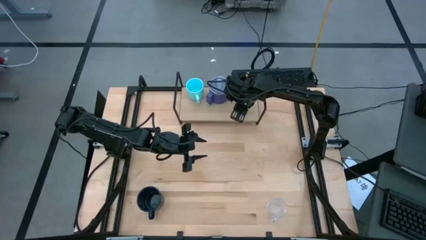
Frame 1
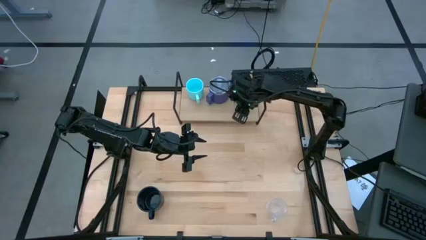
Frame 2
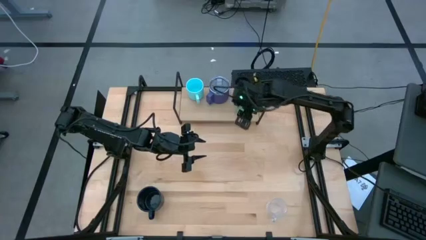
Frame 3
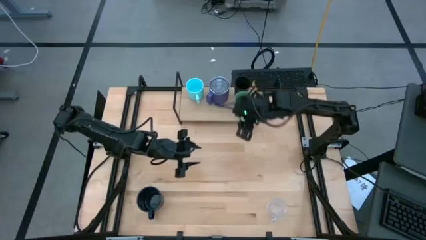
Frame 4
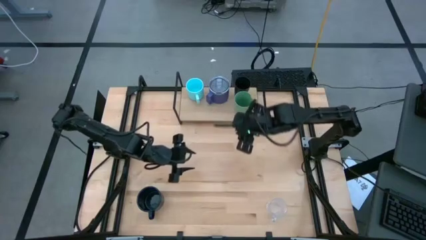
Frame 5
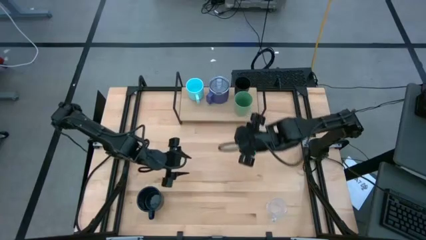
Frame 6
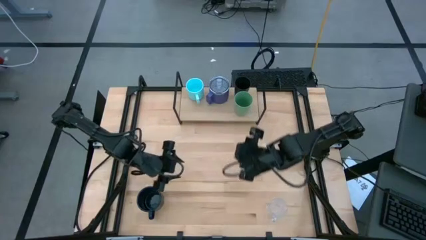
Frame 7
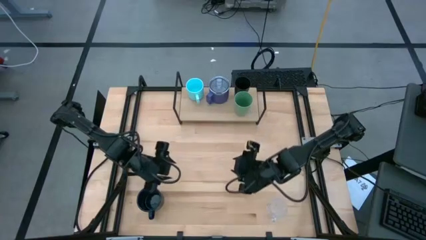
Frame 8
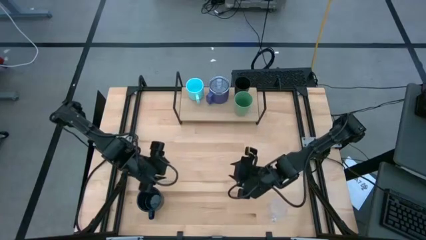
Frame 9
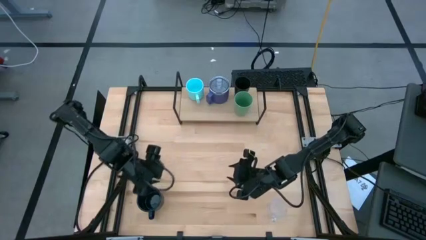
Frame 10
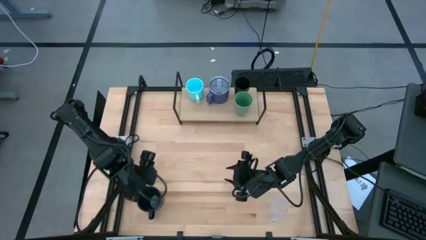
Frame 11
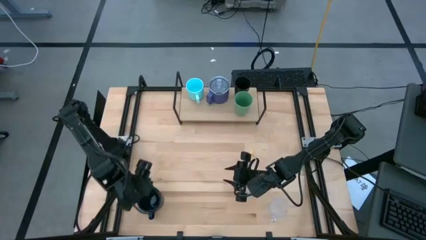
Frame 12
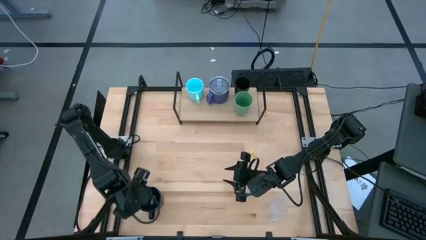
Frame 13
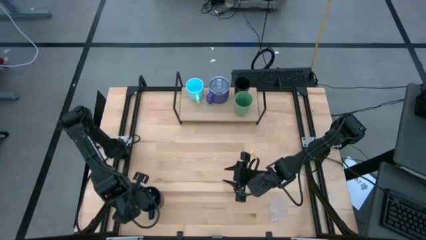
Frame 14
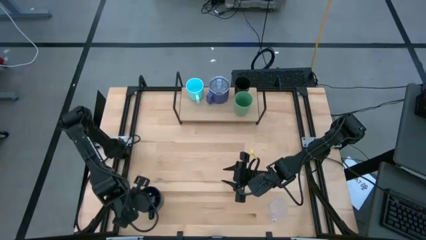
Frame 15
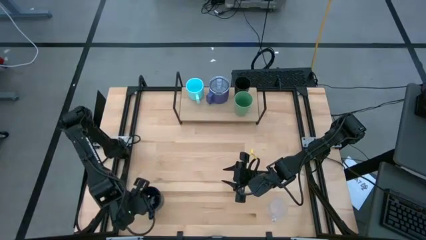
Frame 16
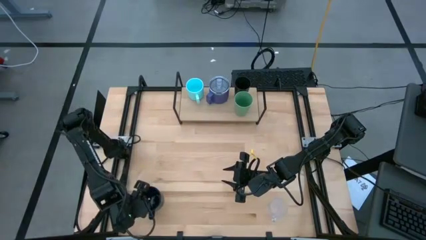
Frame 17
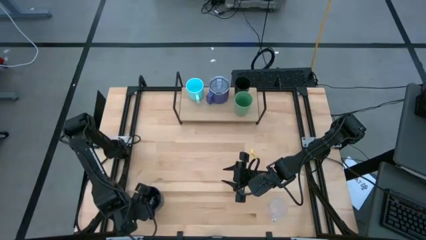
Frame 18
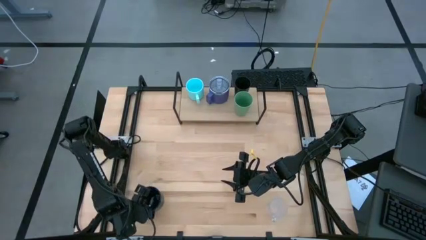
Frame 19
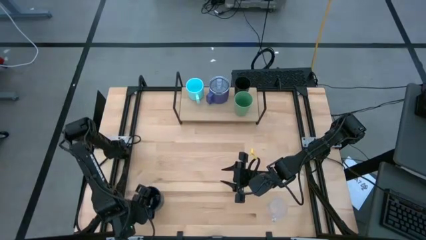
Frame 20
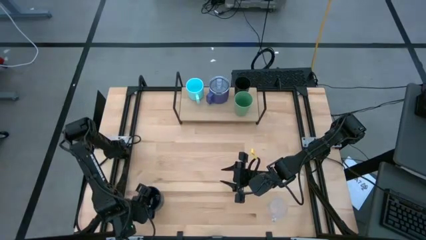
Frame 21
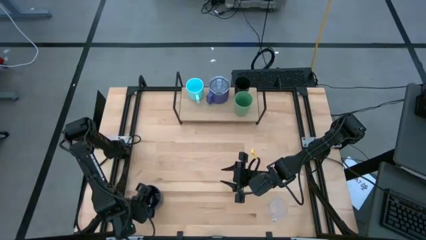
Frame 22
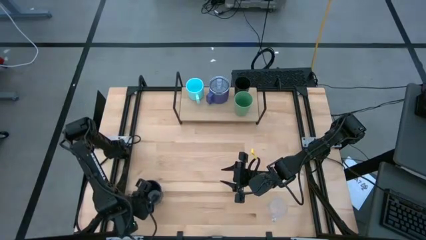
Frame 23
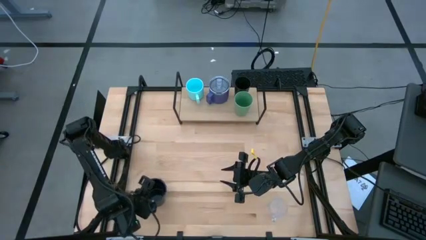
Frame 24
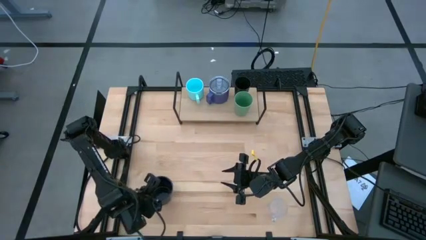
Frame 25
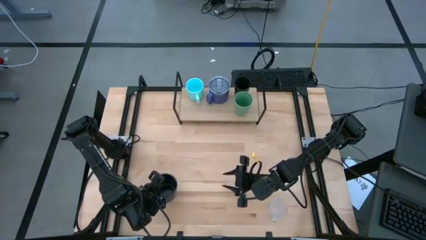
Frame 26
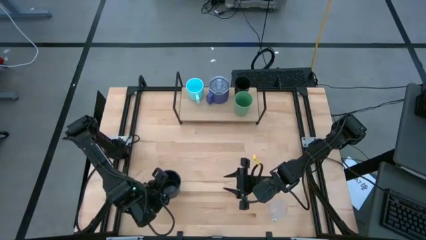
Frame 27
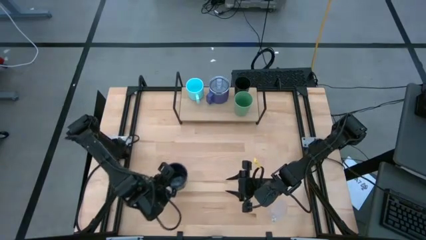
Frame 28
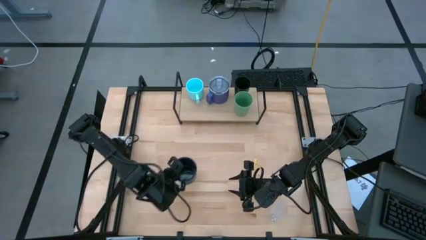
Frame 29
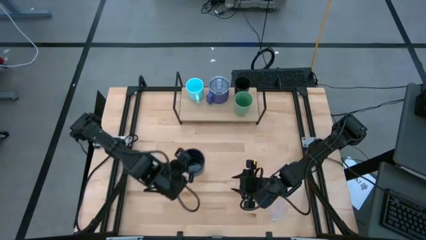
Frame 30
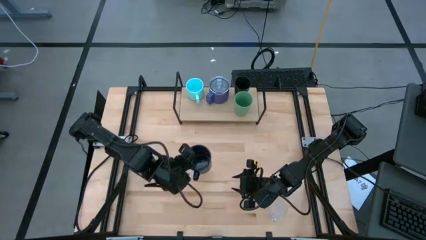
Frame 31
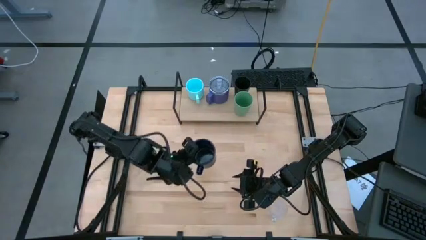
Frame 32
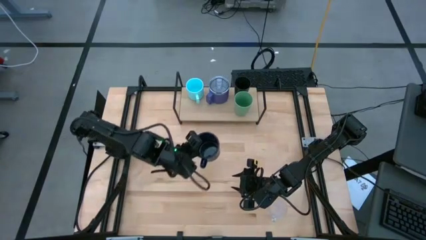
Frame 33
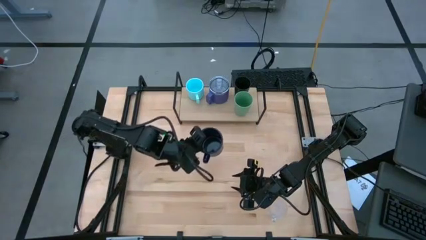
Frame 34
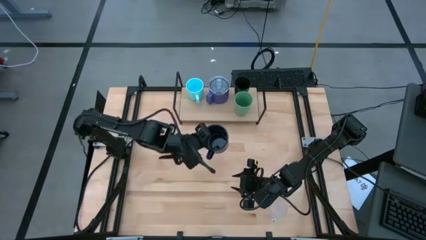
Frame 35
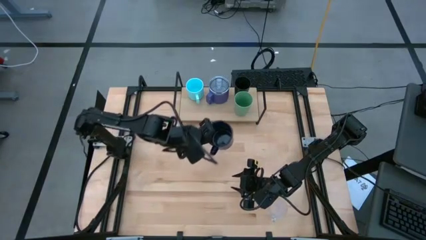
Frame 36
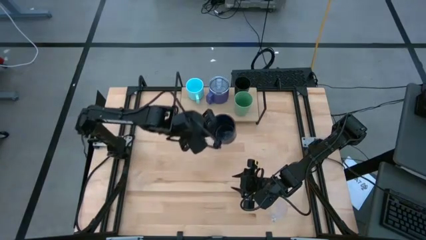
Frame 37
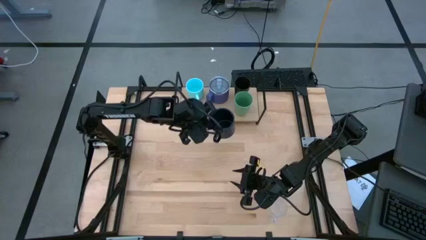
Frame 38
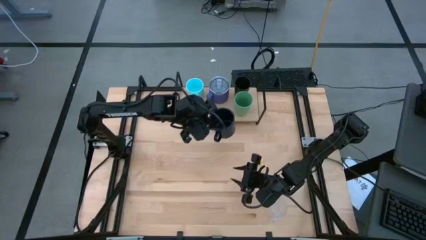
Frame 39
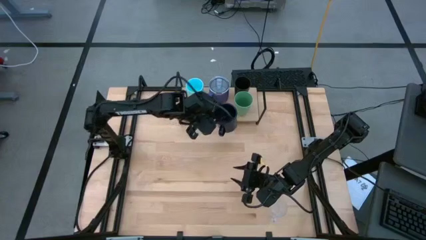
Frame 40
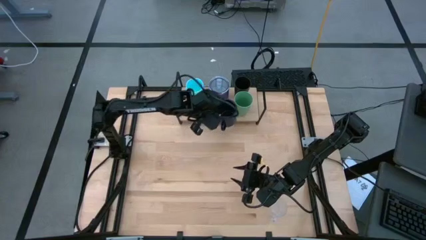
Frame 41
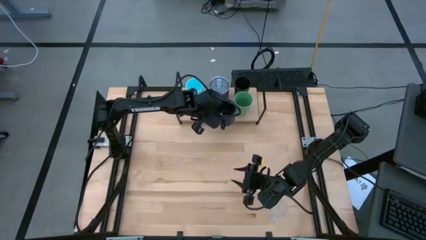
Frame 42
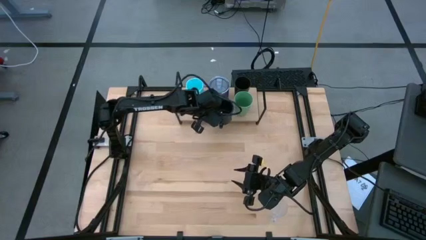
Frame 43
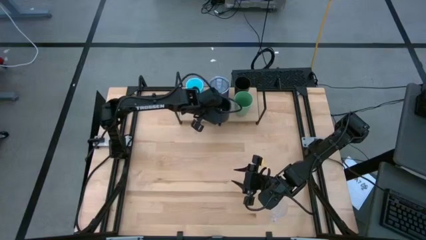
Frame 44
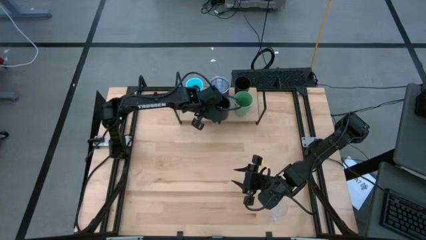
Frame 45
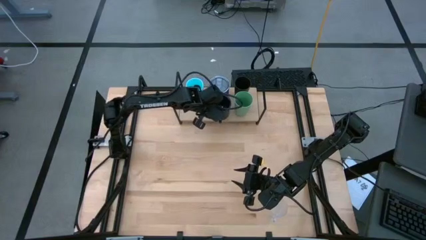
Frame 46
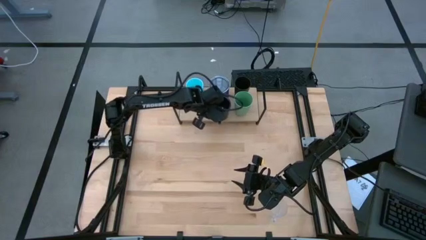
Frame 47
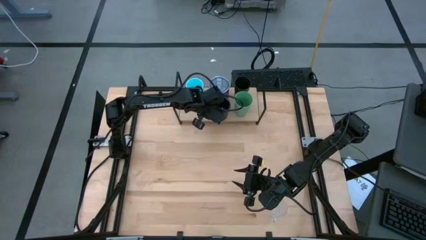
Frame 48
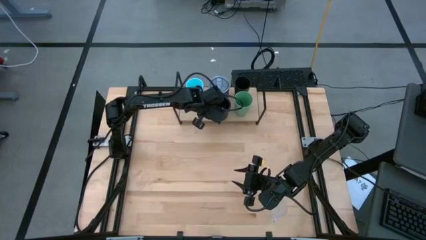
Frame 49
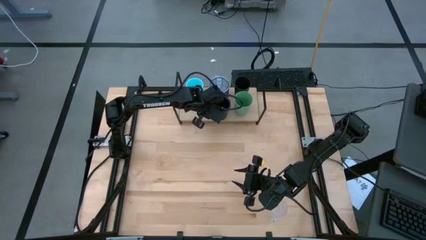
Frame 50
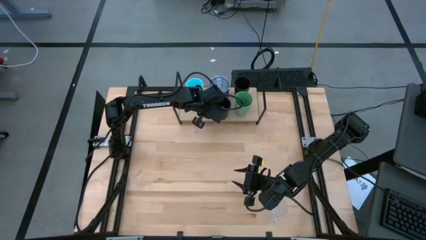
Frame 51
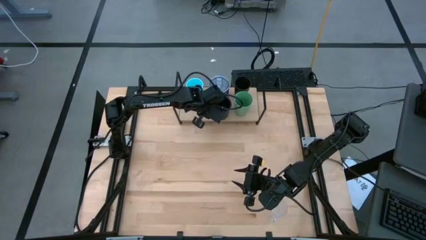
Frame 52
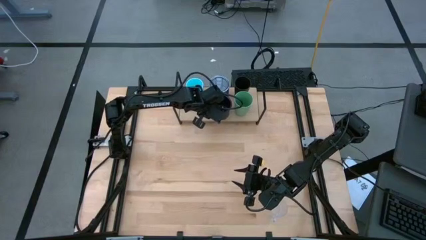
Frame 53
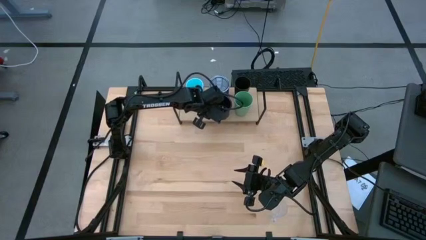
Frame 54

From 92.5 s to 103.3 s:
Task: Stack small to large cups/mugs on shelf
Put the dark blue mug on the shelf

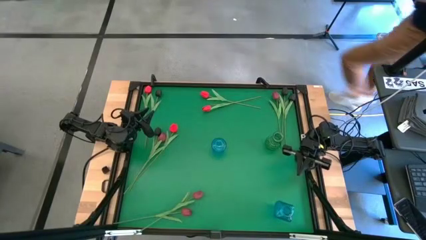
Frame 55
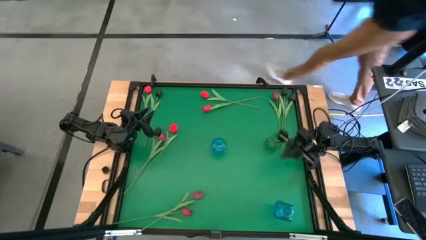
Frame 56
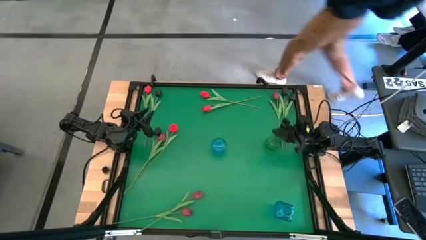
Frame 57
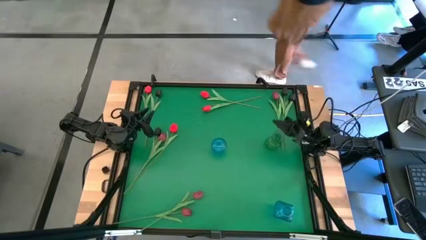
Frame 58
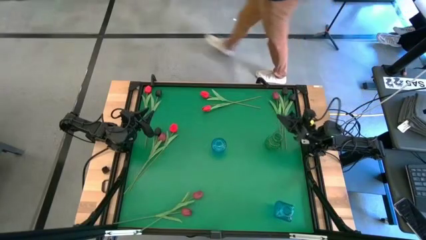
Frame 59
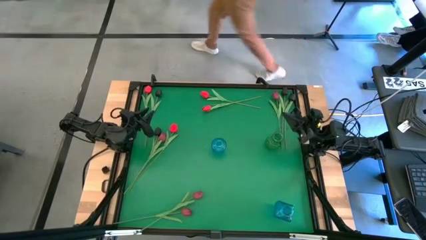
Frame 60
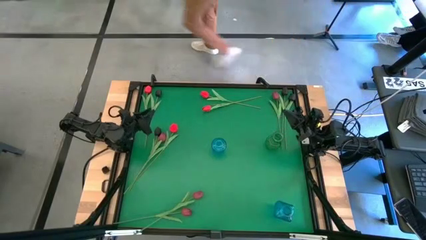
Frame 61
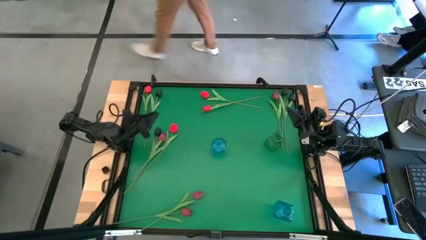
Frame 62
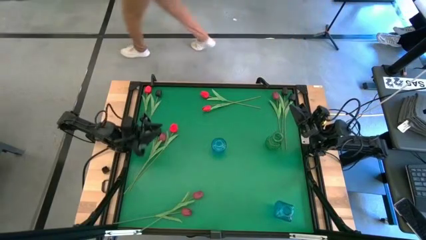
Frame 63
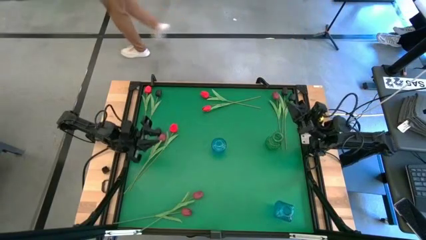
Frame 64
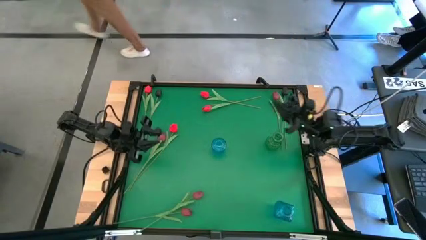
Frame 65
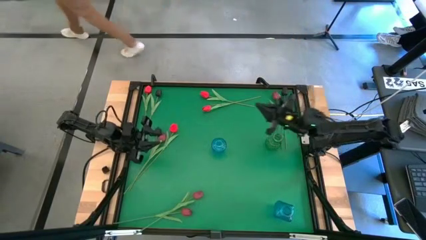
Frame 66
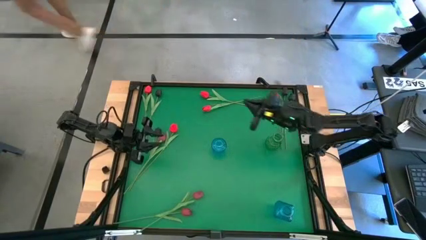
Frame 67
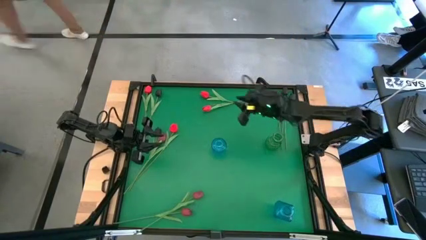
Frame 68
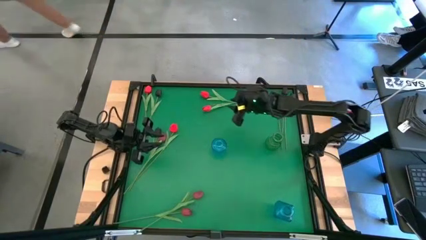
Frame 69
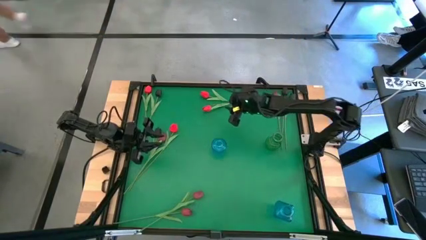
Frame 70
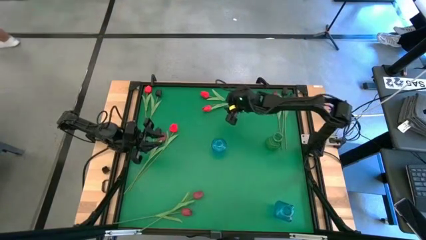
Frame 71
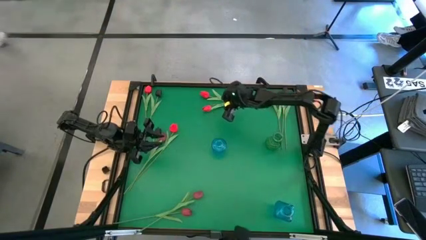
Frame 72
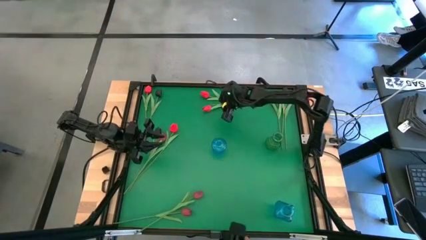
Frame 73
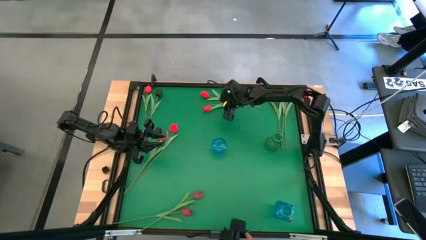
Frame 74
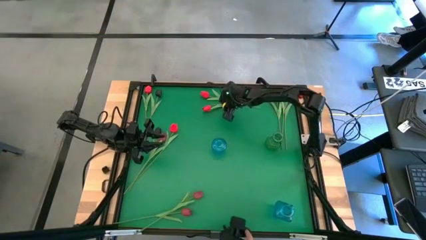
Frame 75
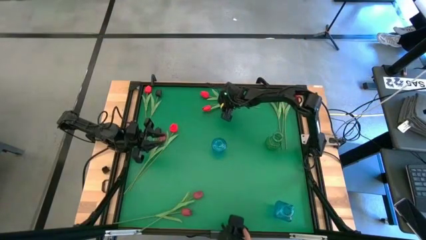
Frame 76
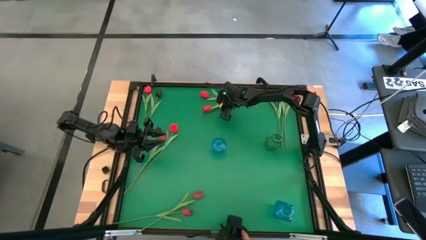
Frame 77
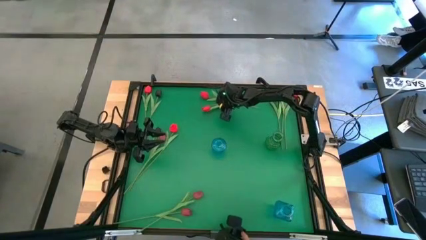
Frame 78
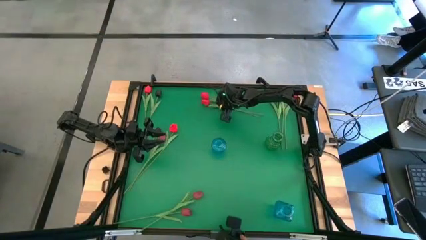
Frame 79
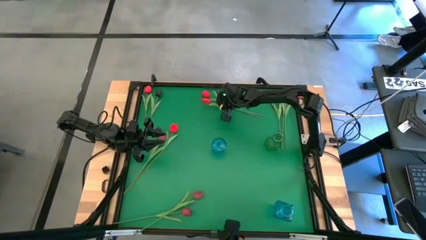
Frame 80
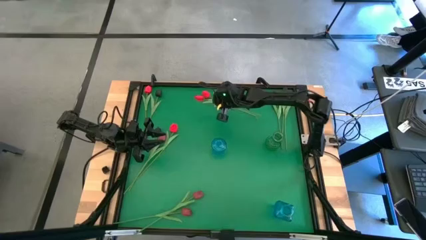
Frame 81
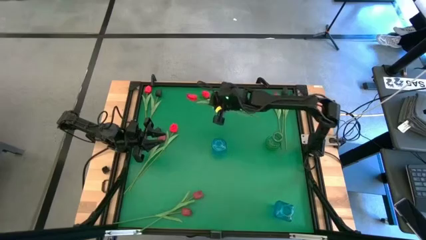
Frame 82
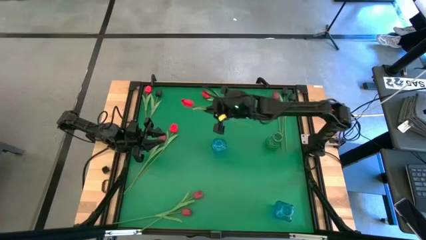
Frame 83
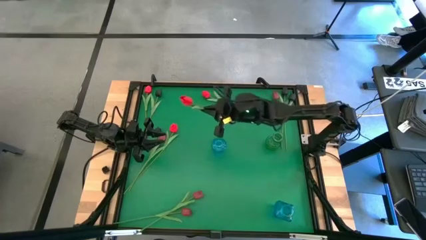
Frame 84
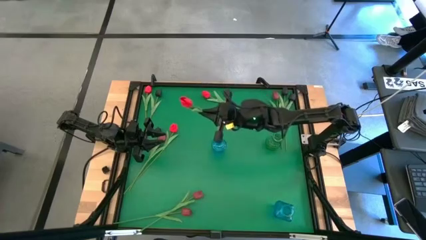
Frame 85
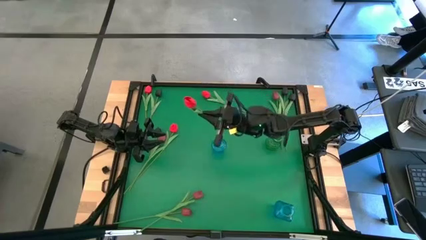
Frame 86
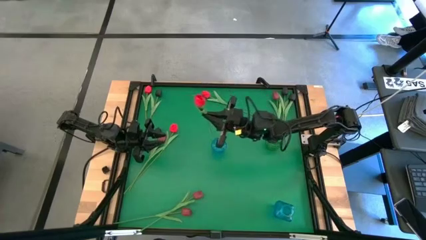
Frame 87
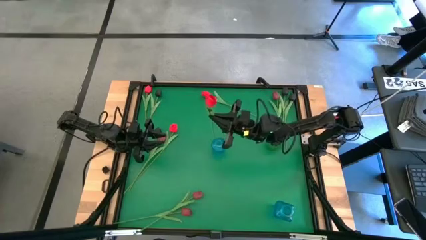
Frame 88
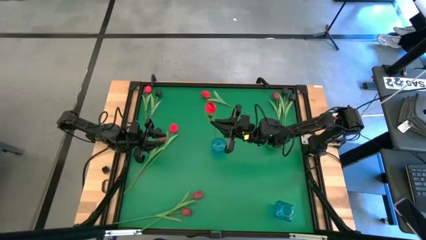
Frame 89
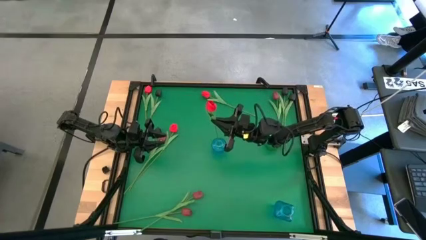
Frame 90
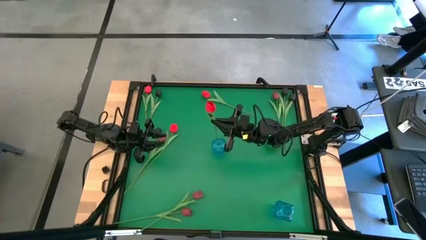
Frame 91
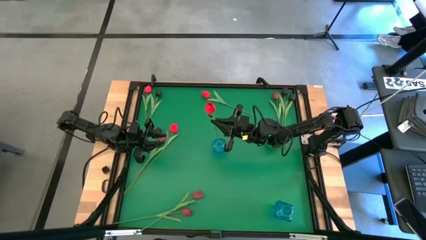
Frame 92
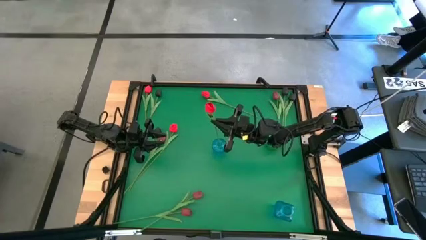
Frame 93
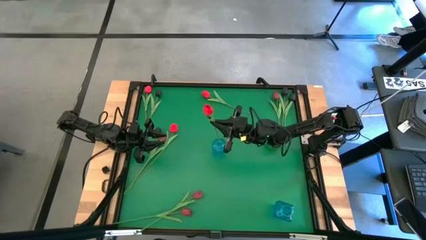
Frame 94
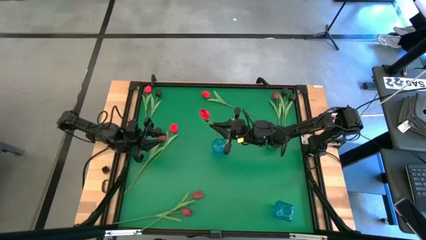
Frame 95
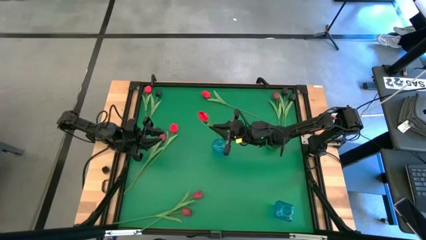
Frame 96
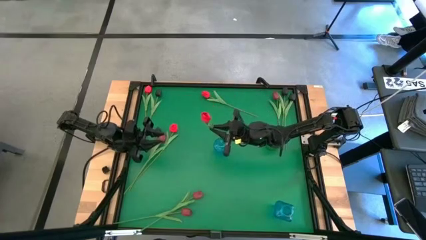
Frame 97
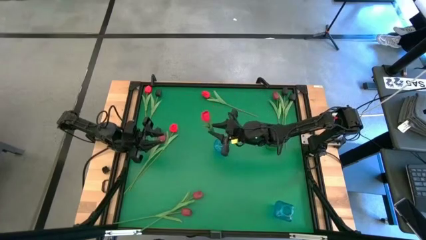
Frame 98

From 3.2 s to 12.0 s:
Task: Sort flowers into vase by color
Put the red flower in the top blue vase
